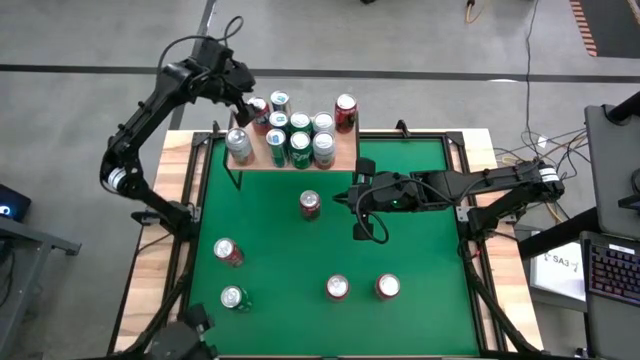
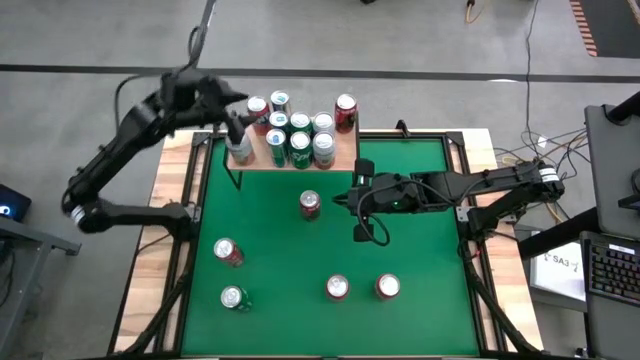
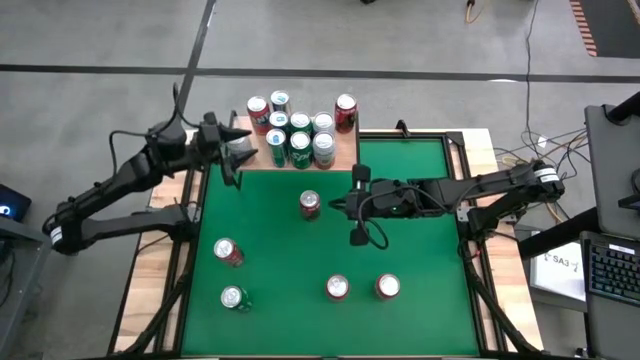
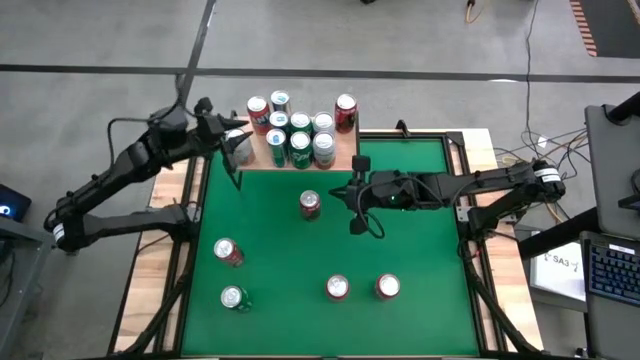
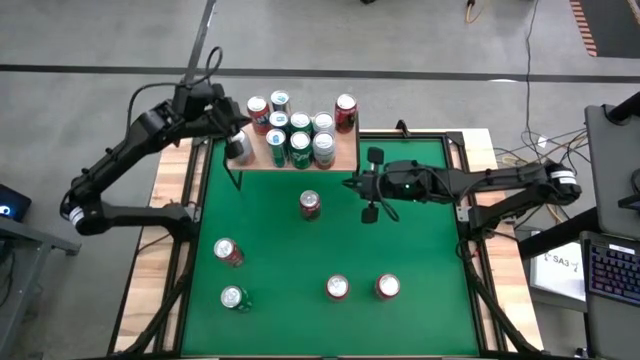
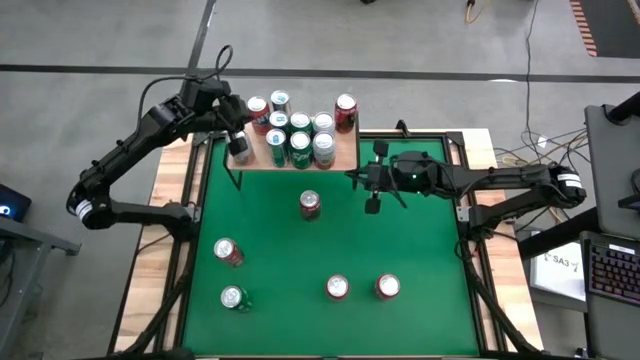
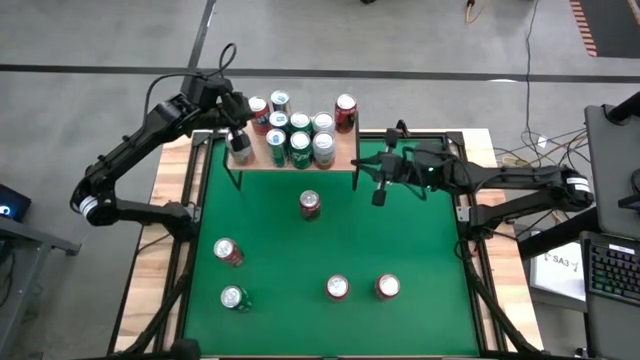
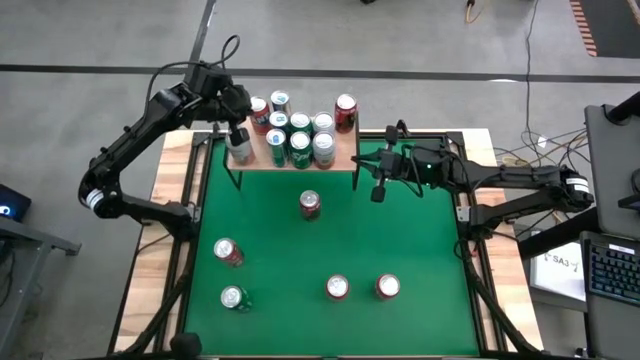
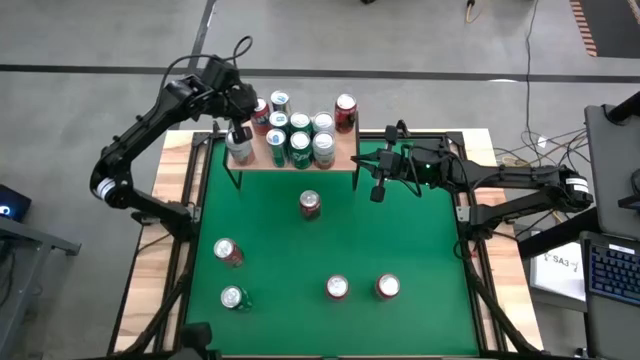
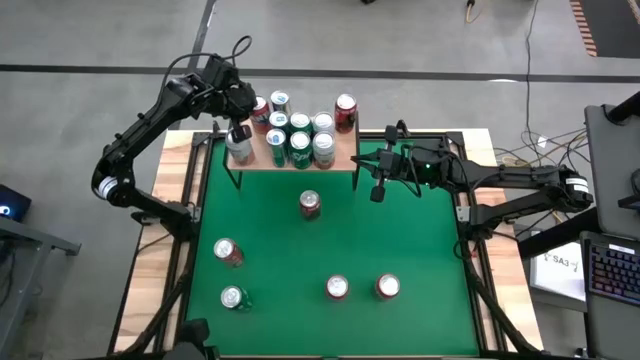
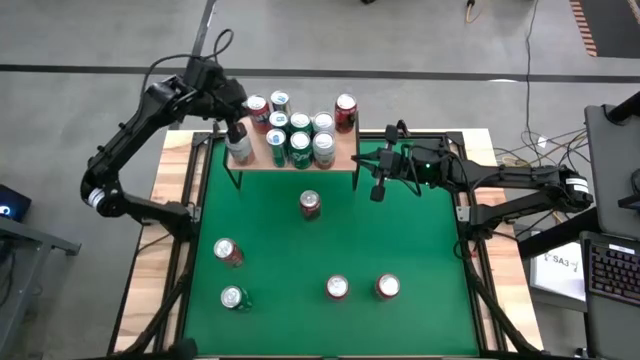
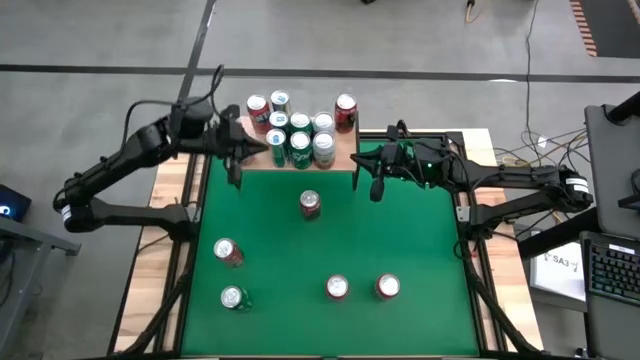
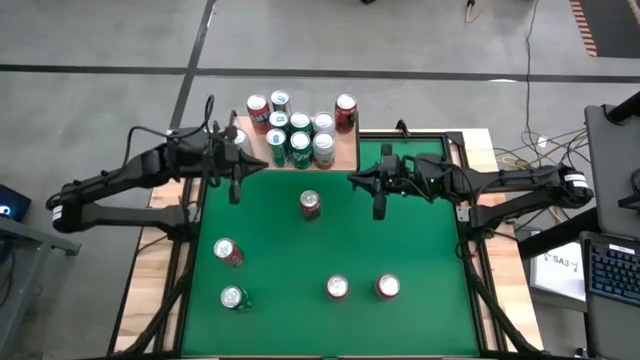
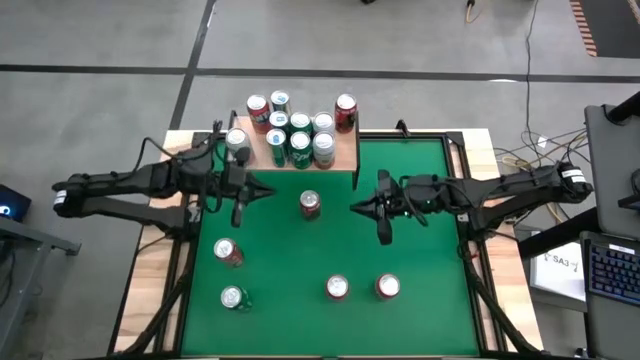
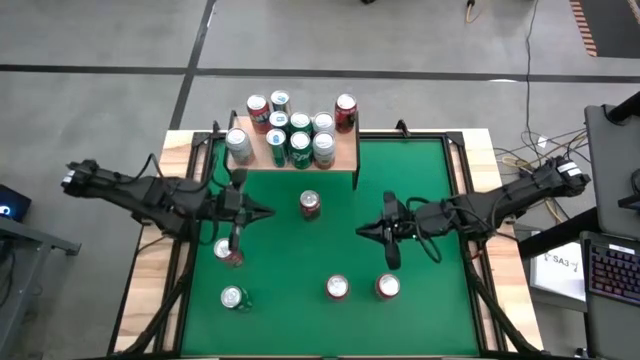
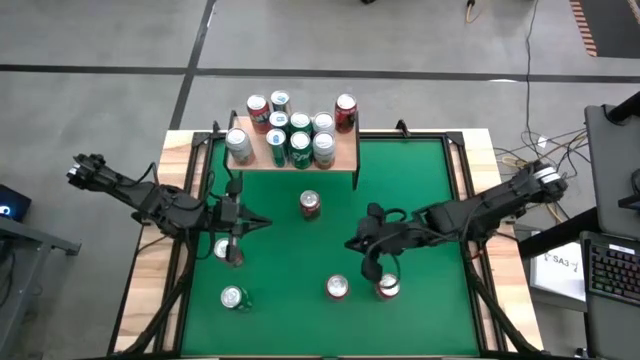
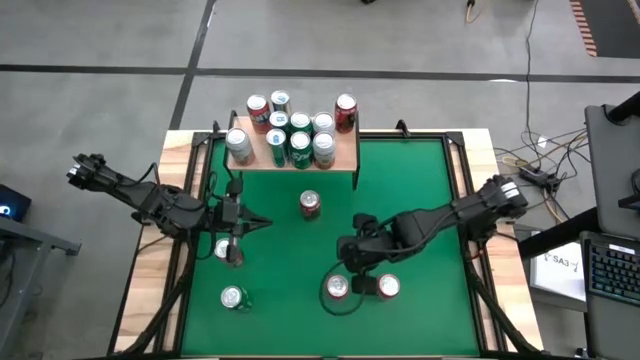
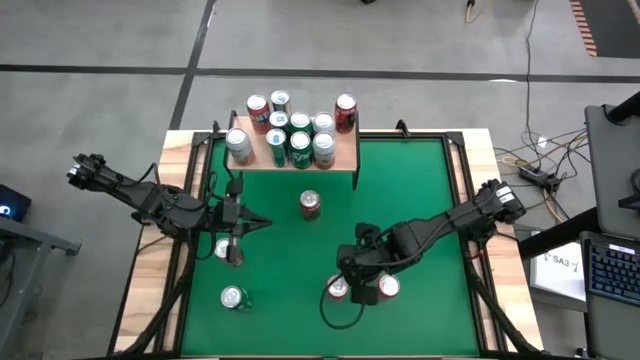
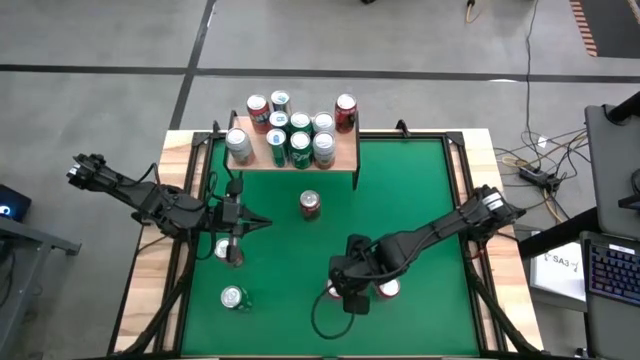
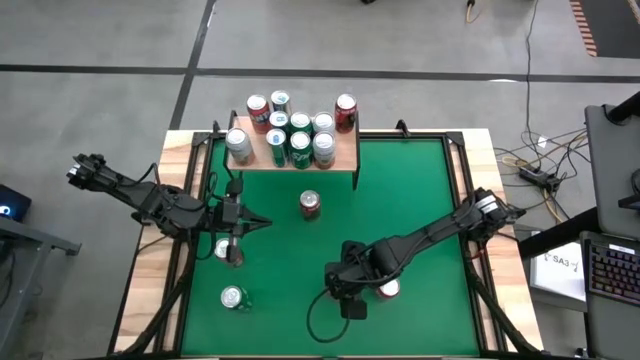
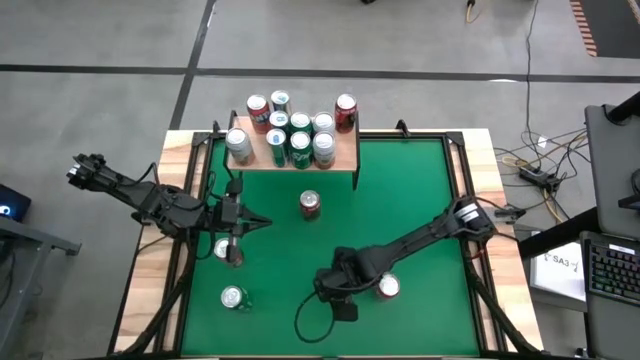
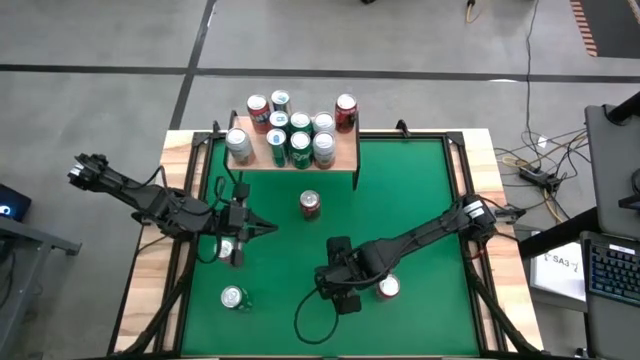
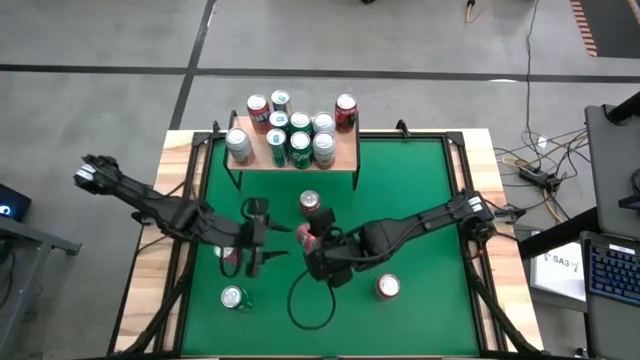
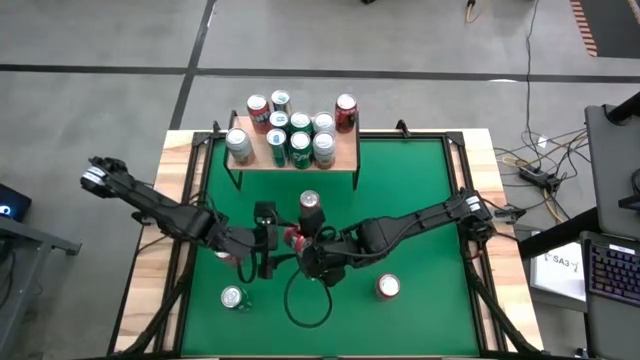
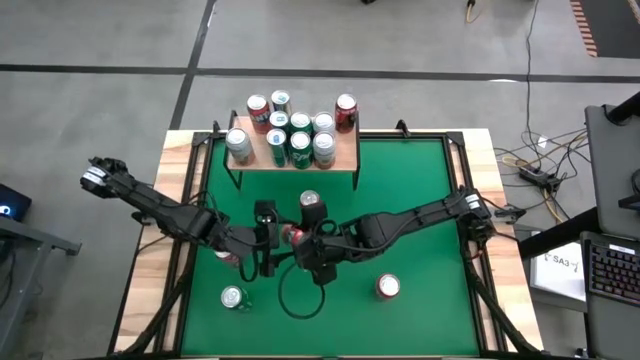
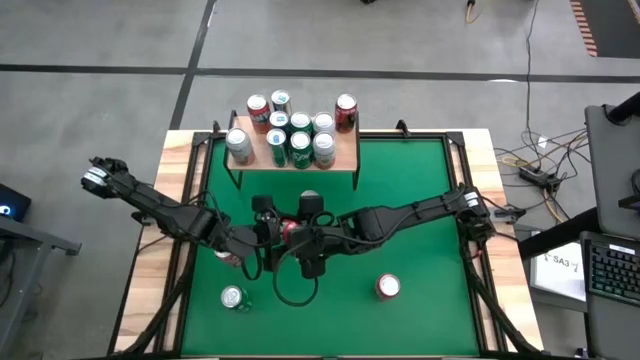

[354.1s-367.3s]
Task: Place canned beverage on shelf
Put the orange can on the shelf

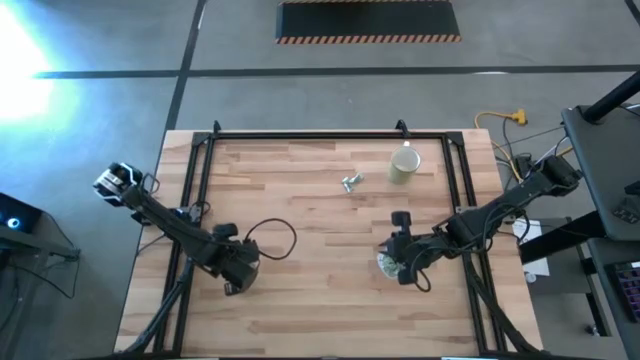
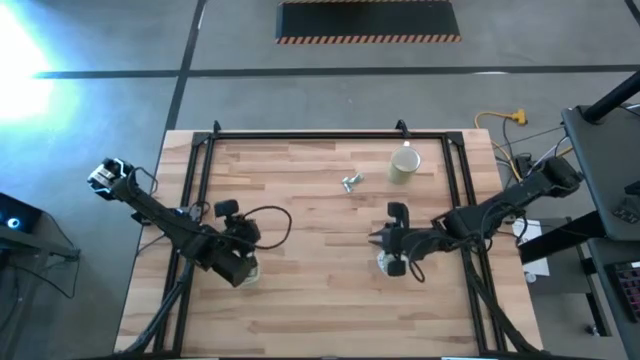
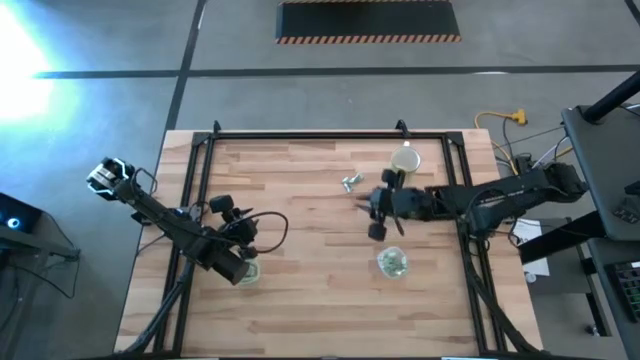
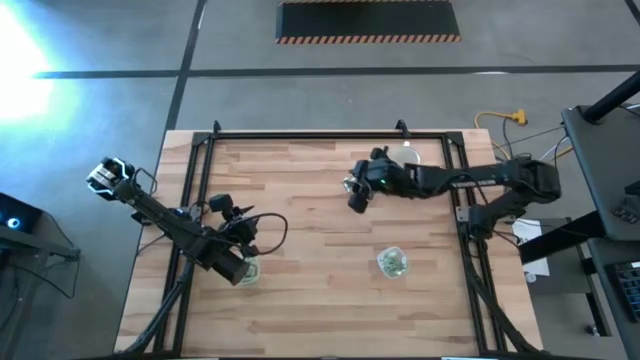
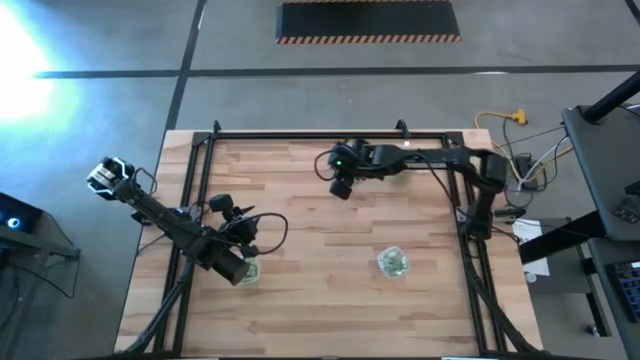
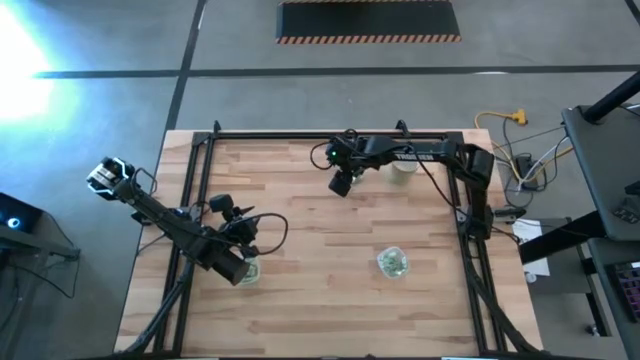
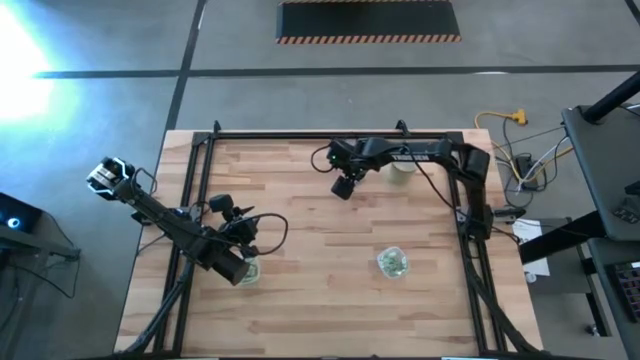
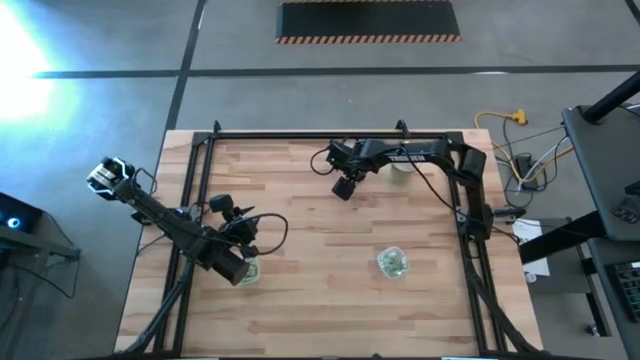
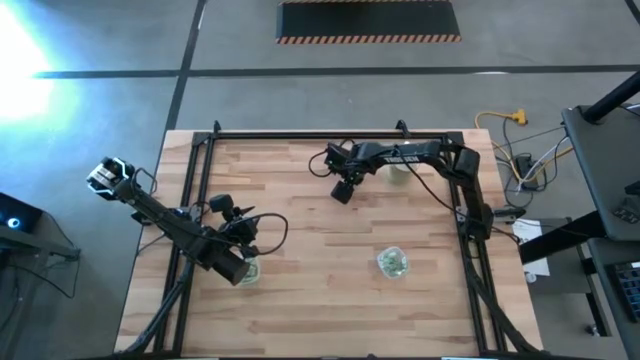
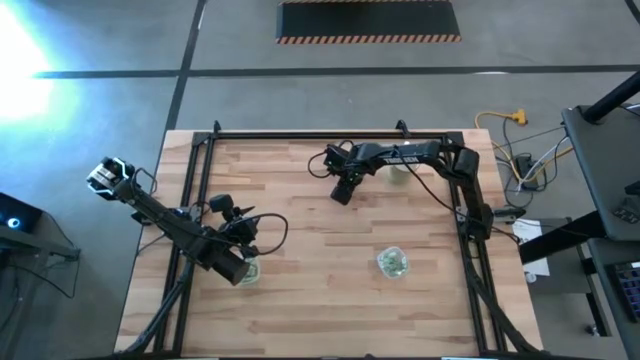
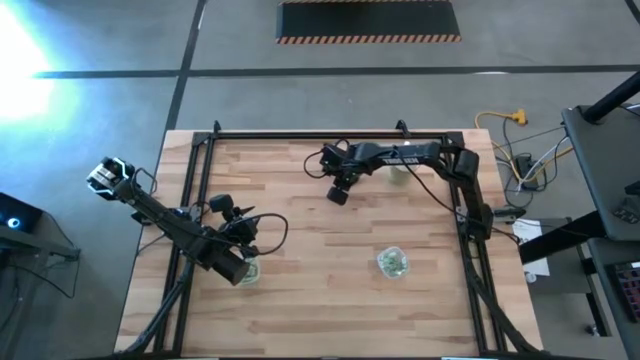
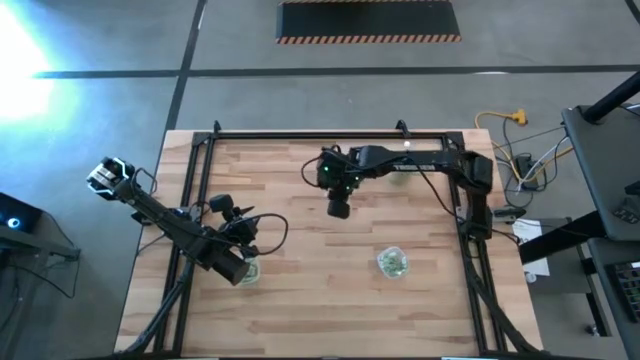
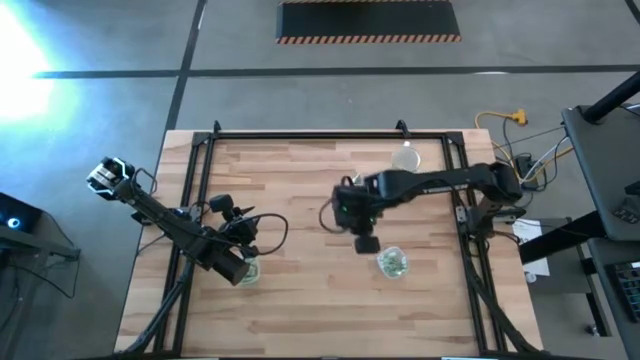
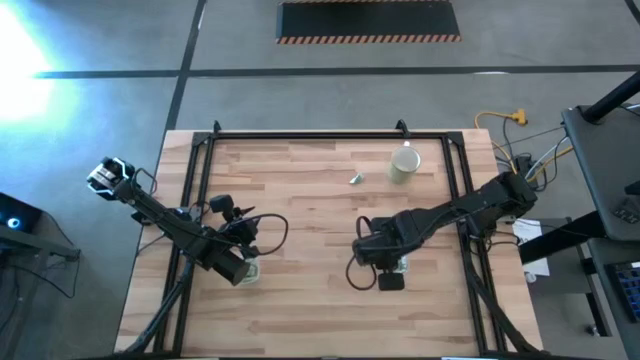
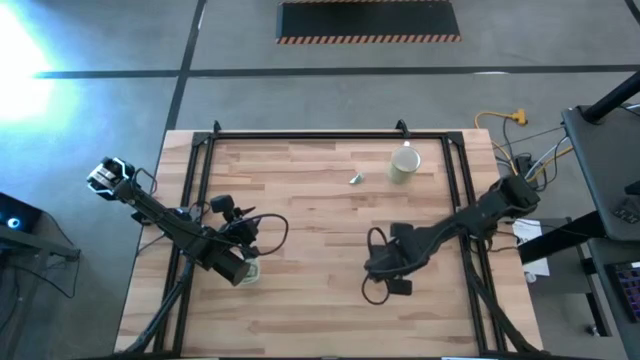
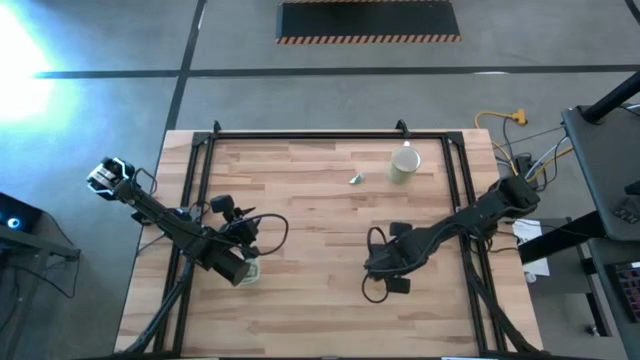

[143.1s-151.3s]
Task: Pick and place Stevia / Truvia into bins
Put the stevia packet into the right transparent container
